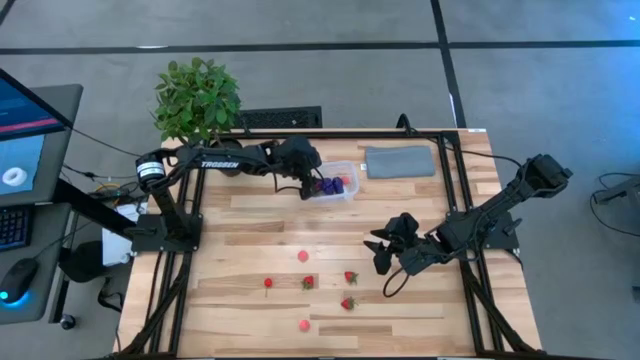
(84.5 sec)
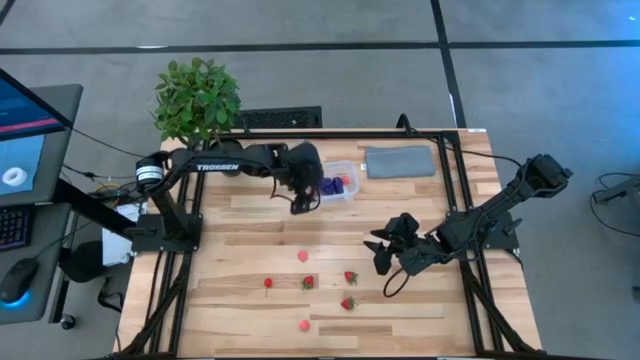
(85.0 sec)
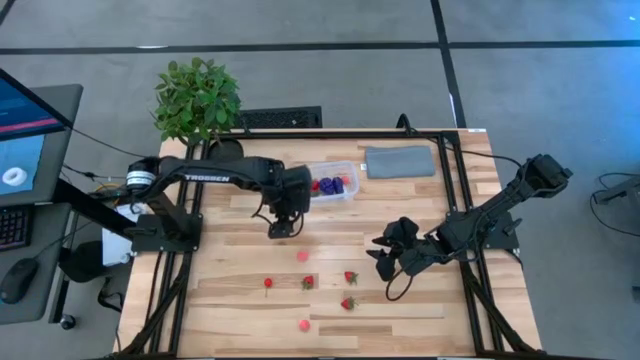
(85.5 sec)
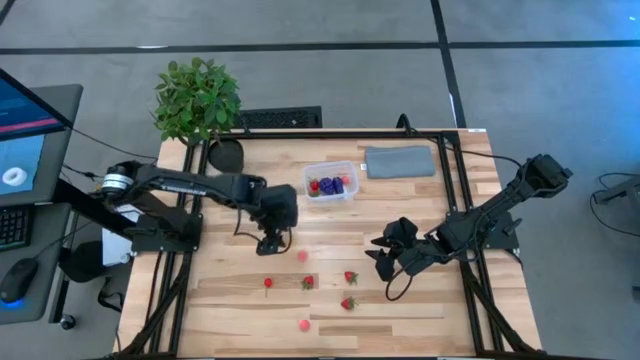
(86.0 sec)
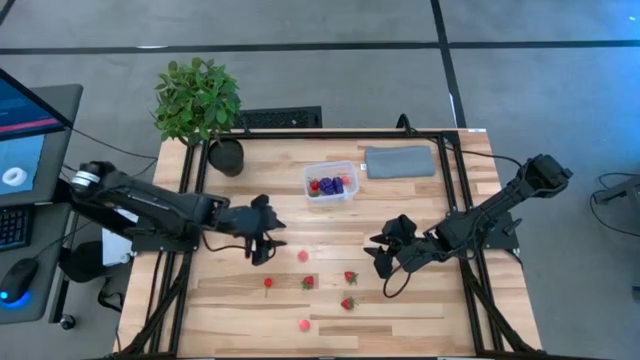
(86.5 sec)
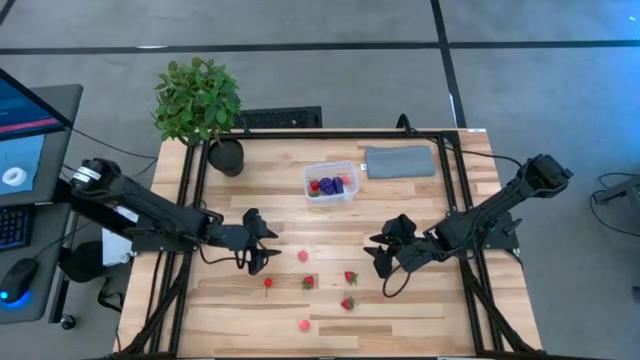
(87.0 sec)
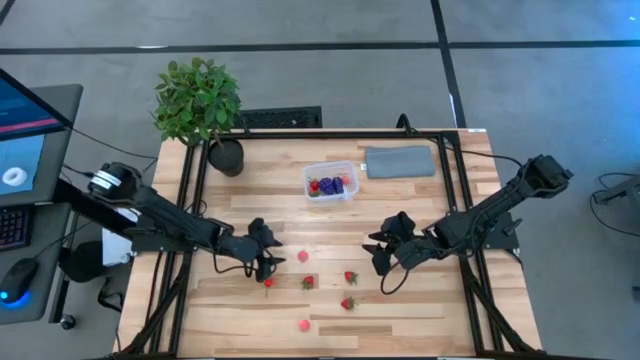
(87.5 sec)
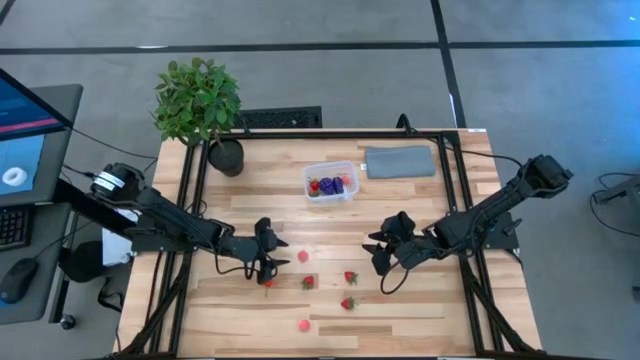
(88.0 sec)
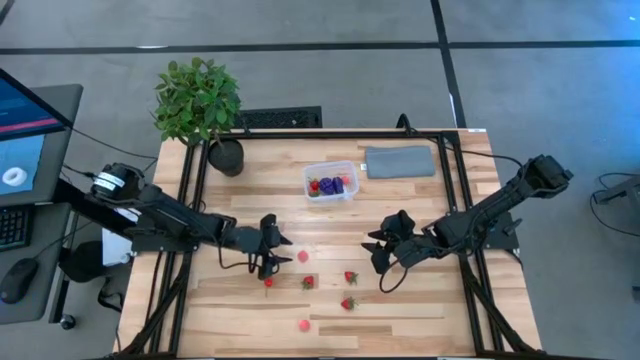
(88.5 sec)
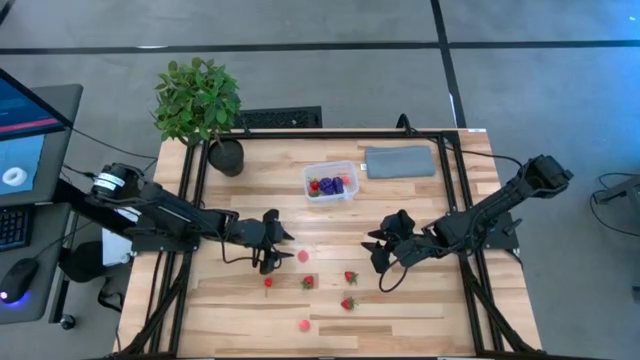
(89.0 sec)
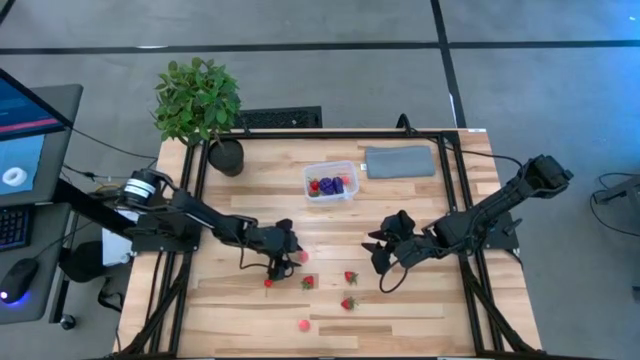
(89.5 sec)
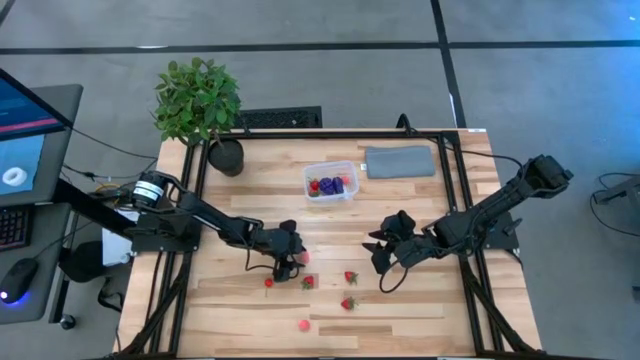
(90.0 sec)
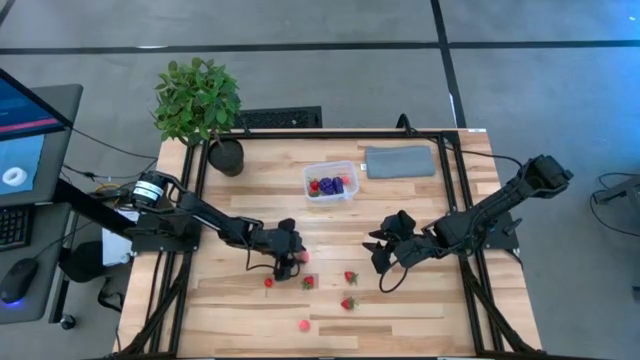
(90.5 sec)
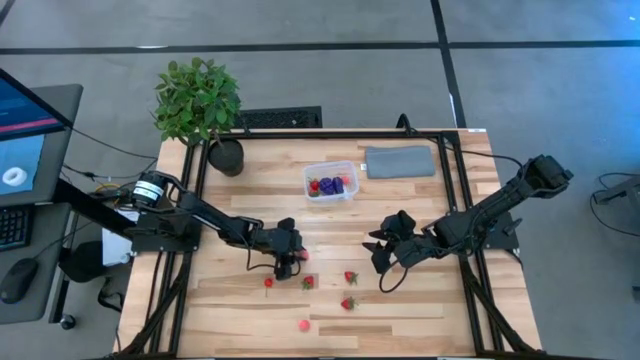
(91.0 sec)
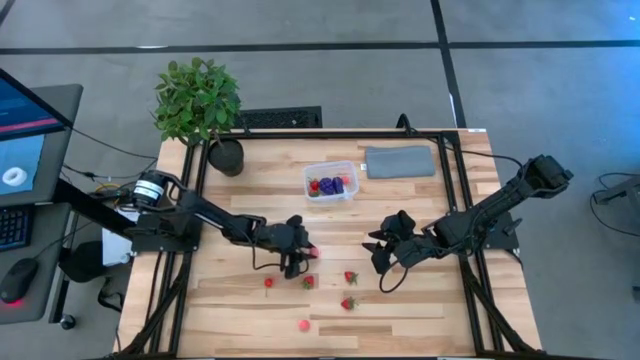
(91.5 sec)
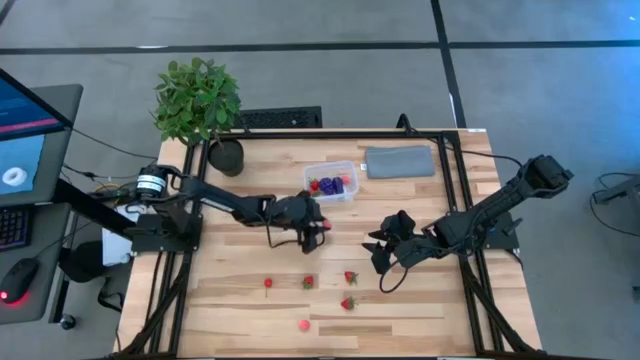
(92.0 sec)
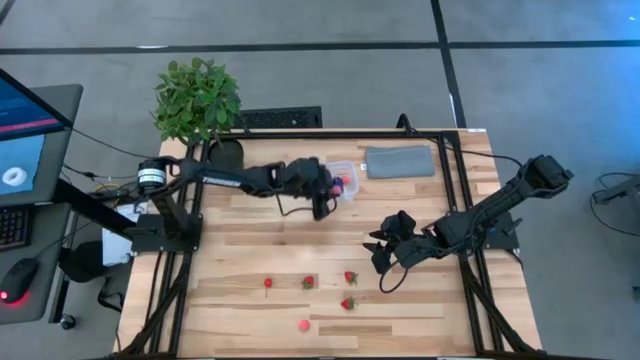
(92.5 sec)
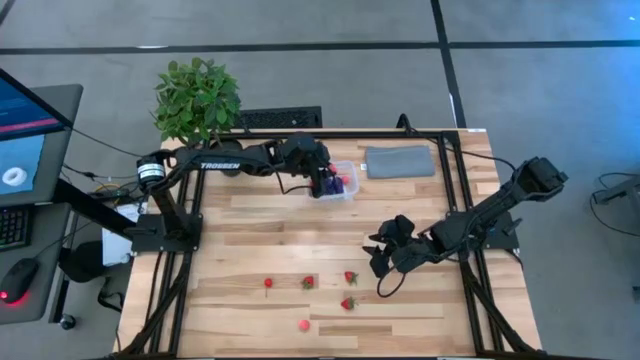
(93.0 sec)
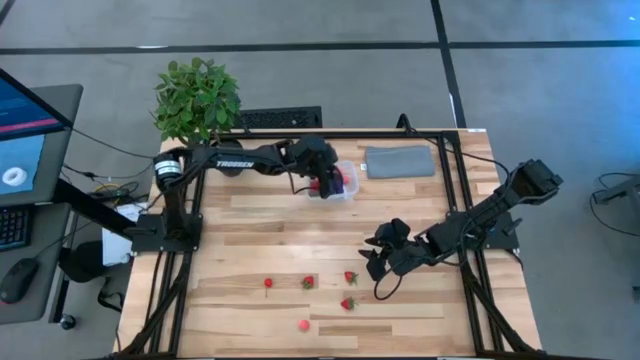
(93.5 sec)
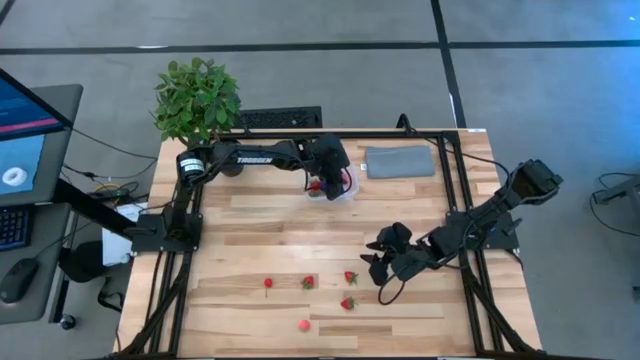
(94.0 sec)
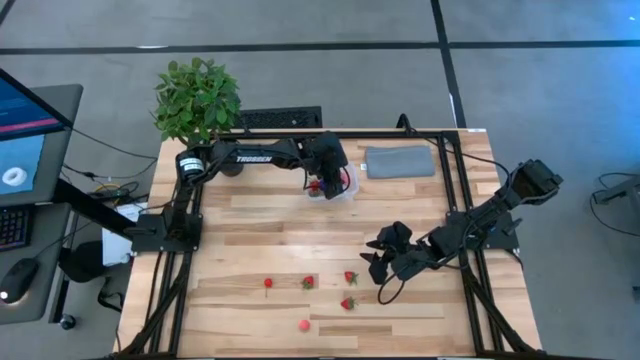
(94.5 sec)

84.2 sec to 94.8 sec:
Task: Pick and placing Produce into tupperware
Put the top apricot into the container

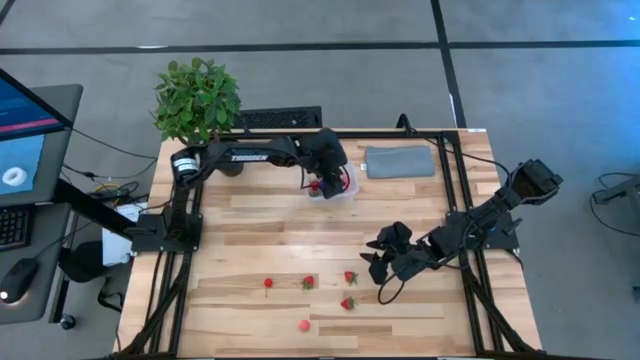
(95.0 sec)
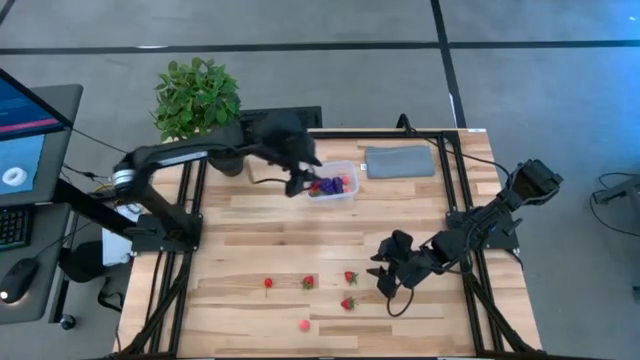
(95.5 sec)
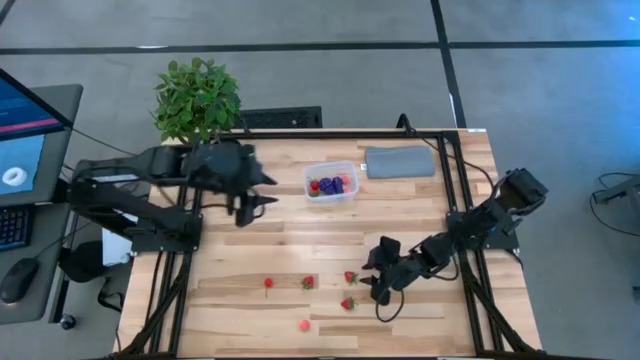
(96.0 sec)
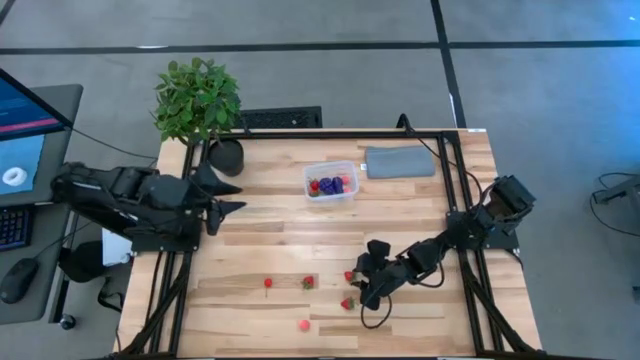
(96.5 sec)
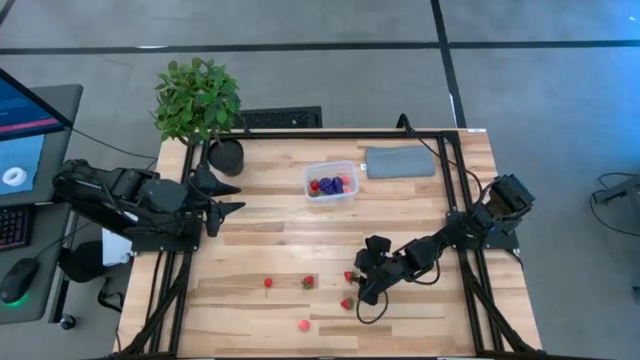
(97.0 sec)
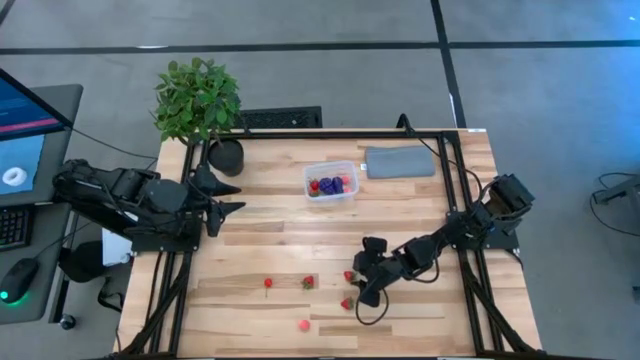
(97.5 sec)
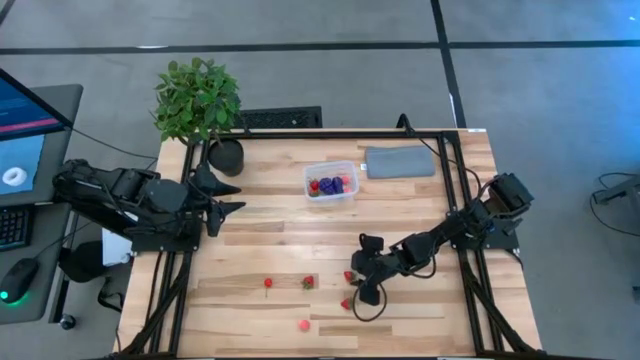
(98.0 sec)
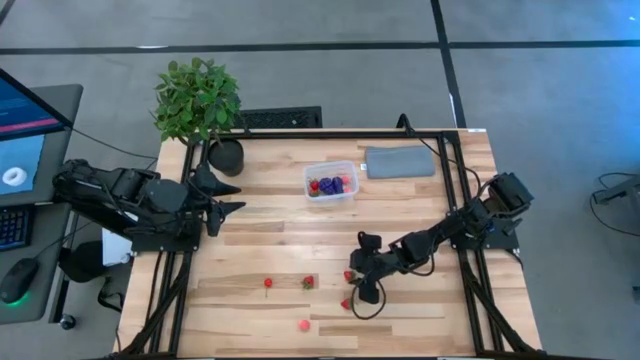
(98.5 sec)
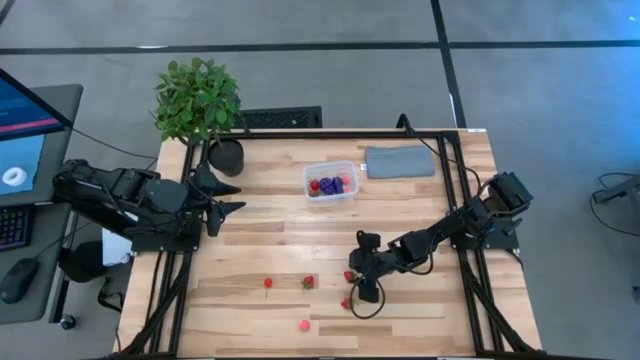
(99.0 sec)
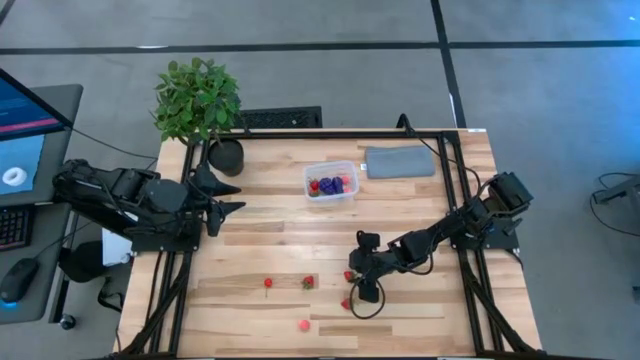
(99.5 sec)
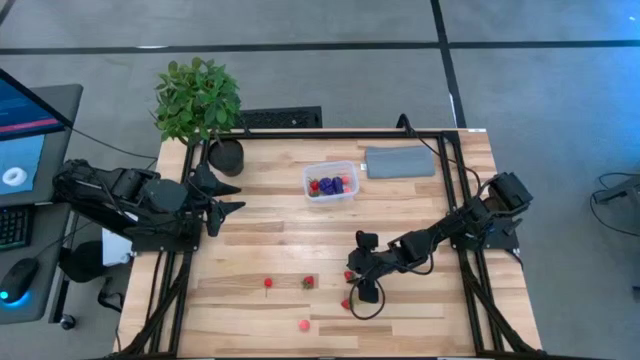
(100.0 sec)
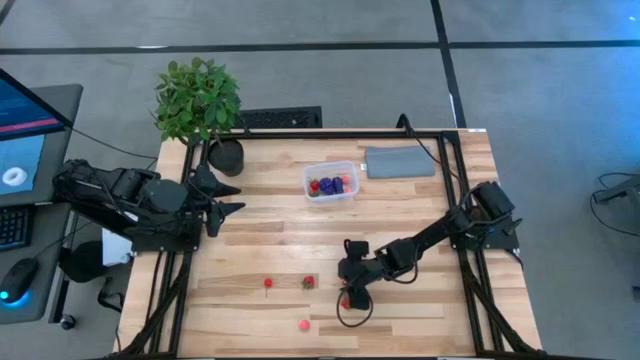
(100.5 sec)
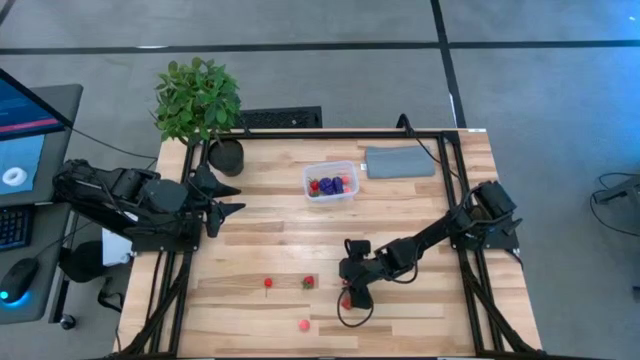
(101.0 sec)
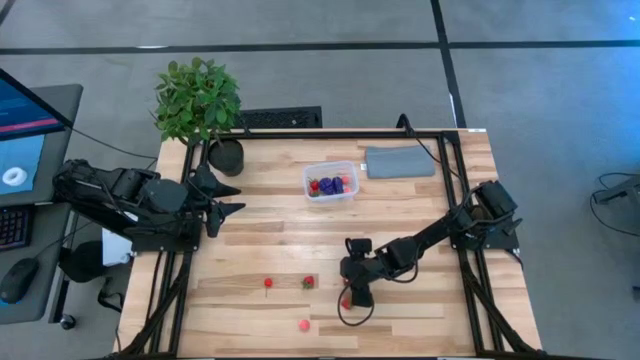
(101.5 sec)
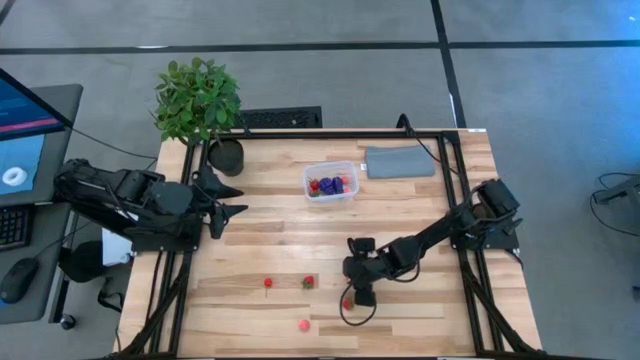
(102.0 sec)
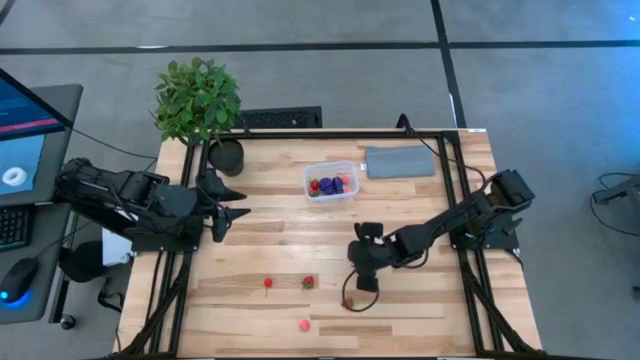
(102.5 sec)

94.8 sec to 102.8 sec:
Put the strawberry into the container
